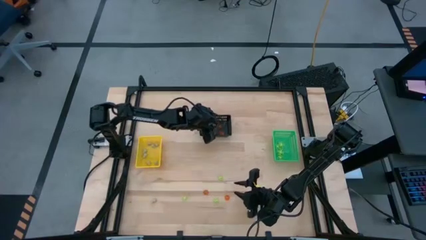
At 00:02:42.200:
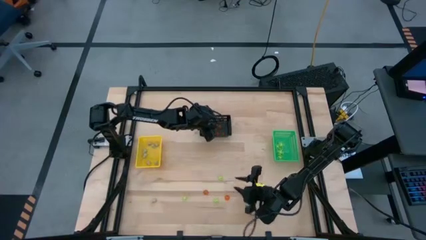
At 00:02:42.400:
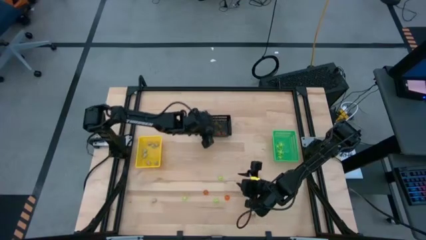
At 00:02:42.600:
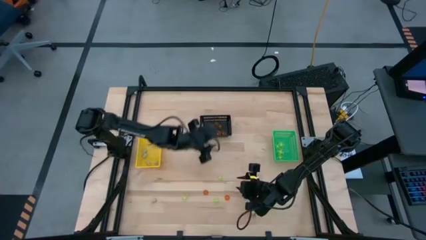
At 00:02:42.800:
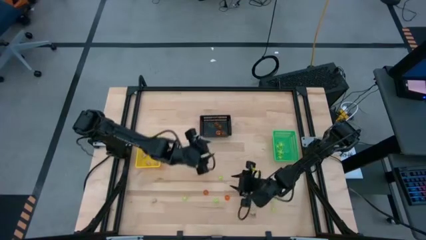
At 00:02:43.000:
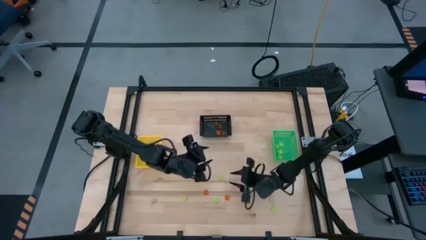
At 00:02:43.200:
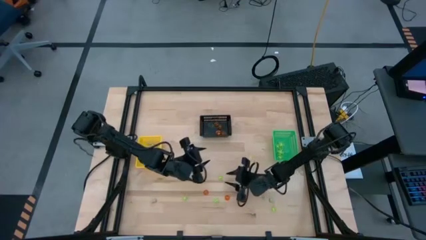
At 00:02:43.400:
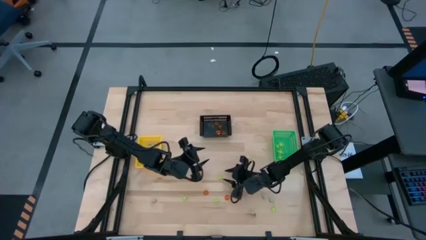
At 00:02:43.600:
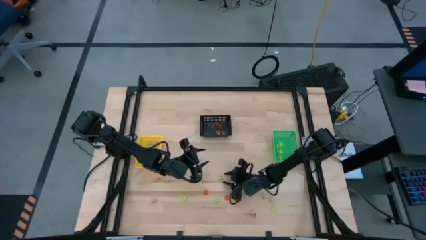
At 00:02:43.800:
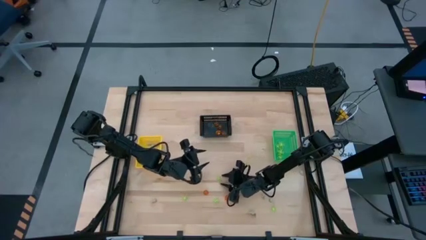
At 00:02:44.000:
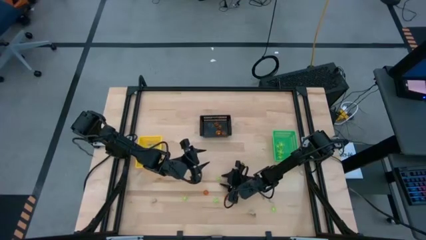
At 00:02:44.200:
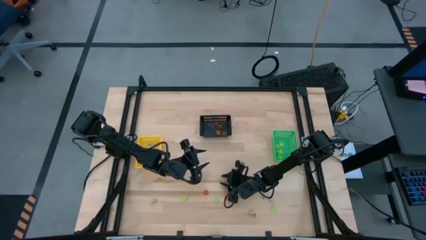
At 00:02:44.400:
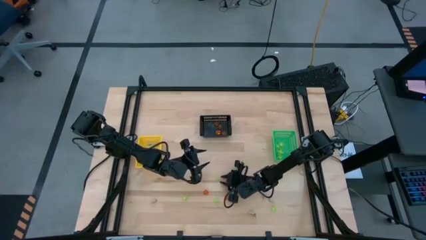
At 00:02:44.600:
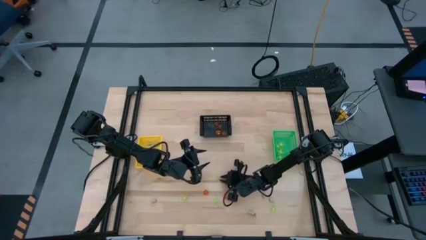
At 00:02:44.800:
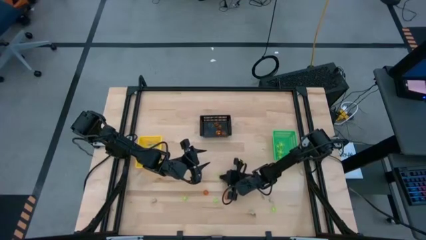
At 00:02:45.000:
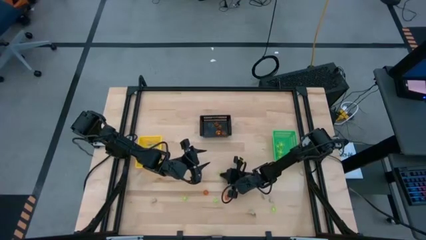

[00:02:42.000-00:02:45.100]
Task: Sort Halloween decoration
Put the green spider toy into the green bin

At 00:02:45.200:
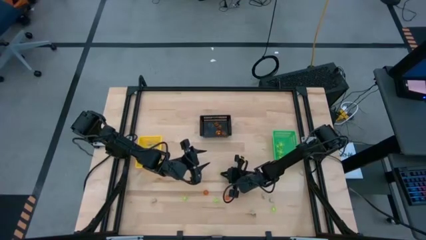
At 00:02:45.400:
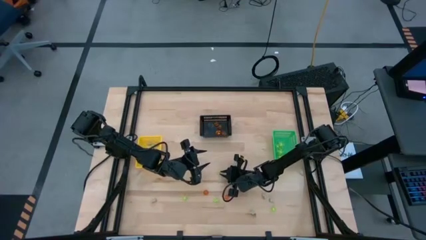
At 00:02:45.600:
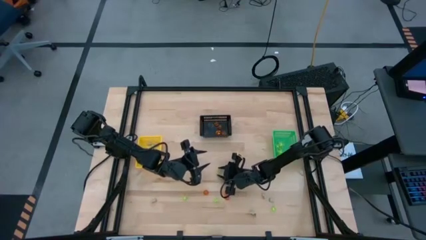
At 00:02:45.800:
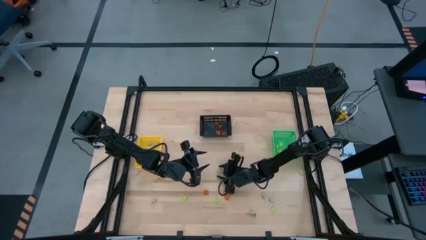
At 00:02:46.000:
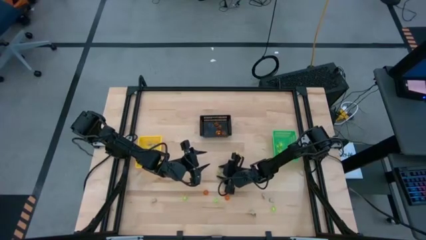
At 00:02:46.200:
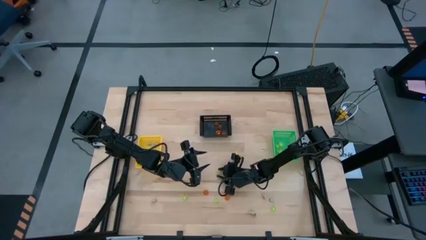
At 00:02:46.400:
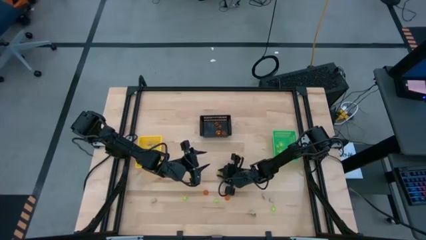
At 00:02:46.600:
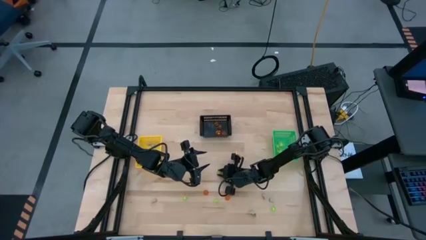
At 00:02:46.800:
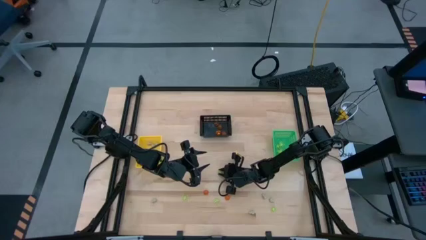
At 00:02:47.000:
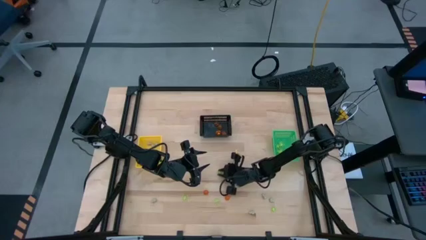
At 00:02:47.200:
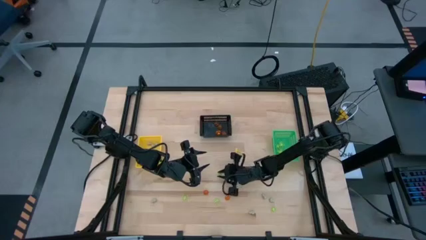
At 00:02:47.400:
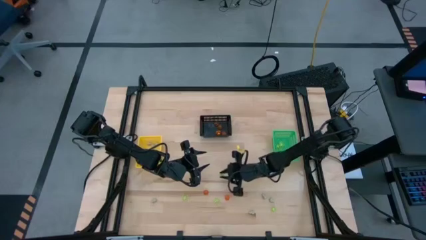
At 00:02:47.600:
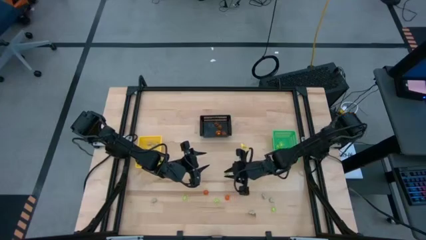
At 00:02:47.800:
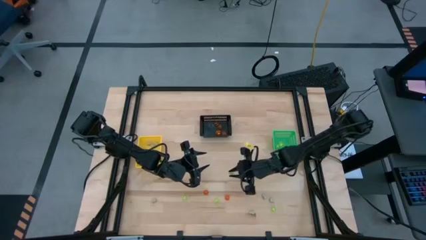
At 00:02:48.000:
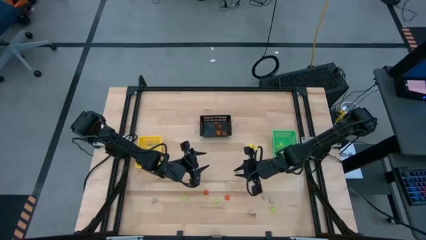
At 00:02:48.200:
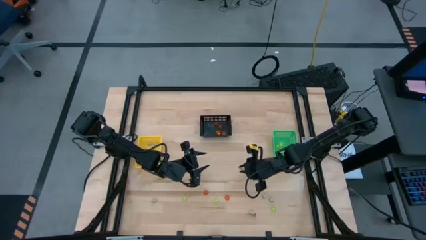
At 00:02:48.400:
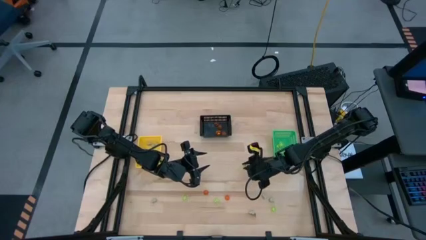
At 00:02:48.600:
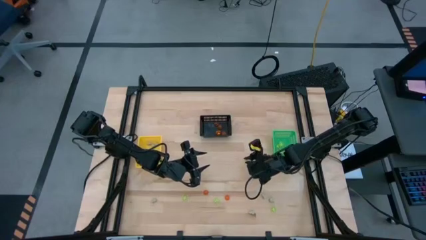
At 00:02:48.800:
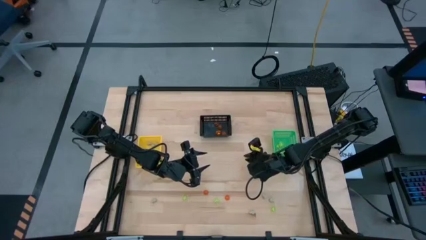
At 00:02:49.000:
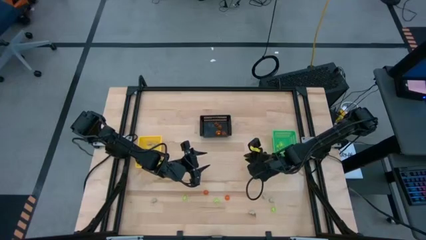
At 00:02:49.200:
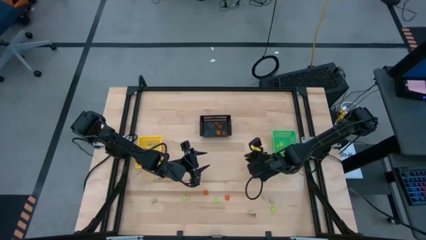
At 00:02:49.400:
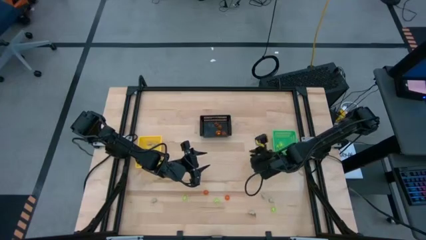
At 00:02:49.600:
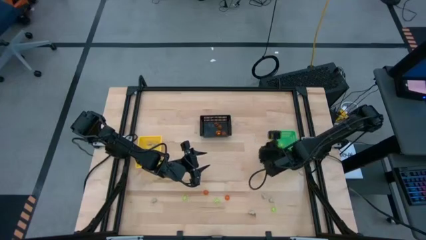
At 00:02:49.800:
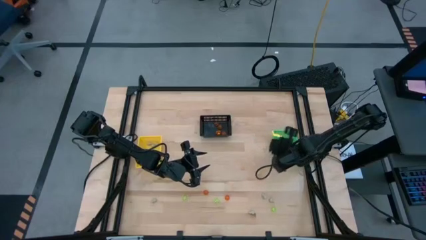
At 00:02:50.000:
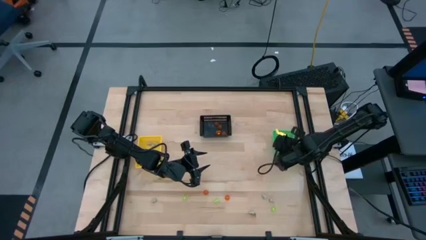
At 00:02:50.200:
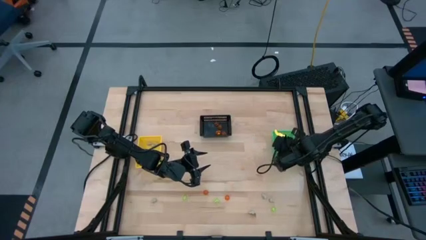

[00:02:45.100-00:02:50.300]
Put the green spider toy into the green bin

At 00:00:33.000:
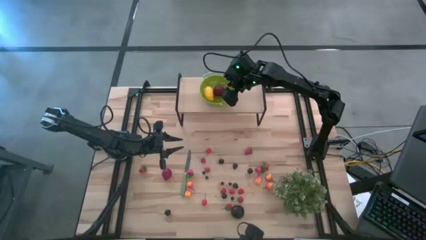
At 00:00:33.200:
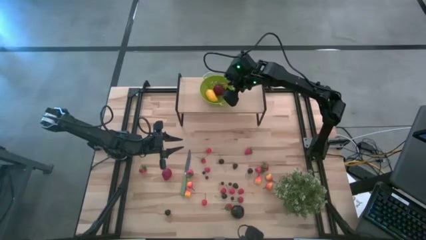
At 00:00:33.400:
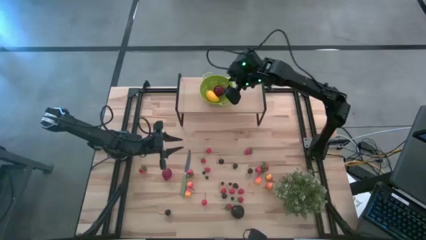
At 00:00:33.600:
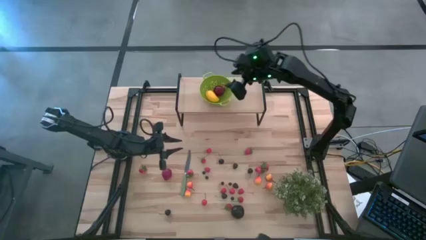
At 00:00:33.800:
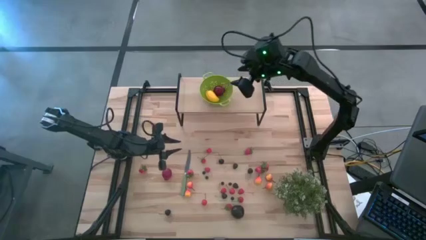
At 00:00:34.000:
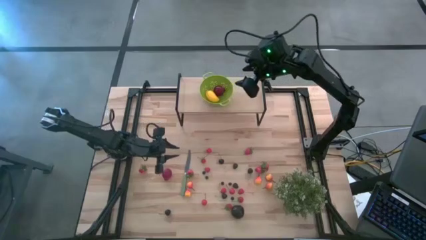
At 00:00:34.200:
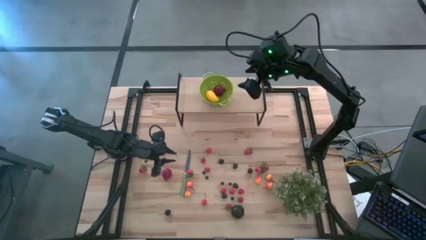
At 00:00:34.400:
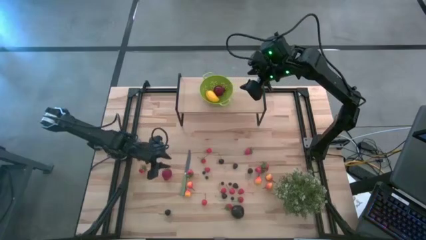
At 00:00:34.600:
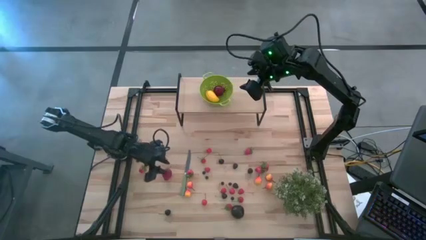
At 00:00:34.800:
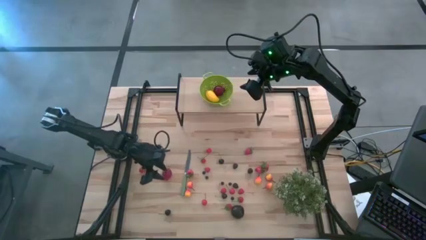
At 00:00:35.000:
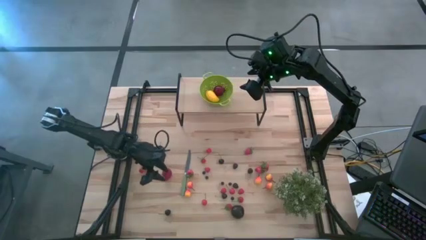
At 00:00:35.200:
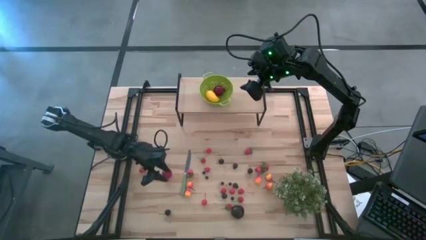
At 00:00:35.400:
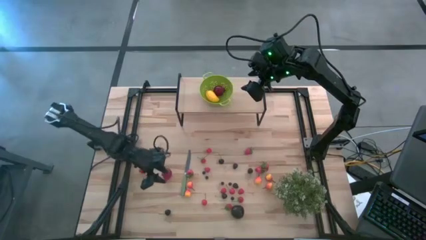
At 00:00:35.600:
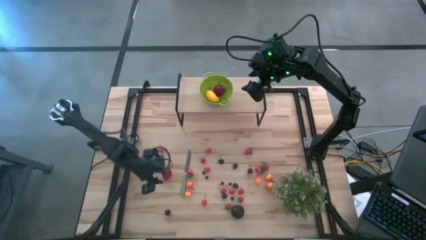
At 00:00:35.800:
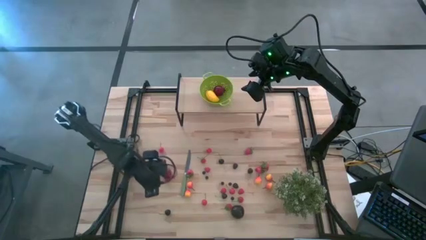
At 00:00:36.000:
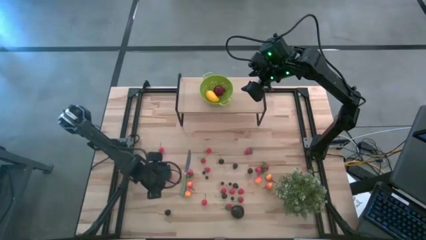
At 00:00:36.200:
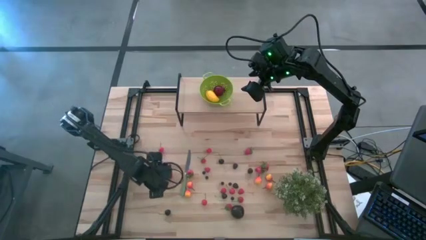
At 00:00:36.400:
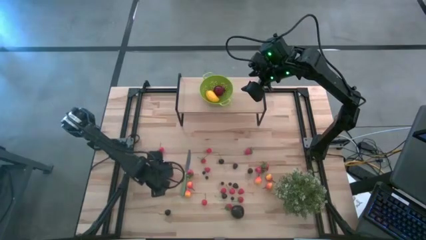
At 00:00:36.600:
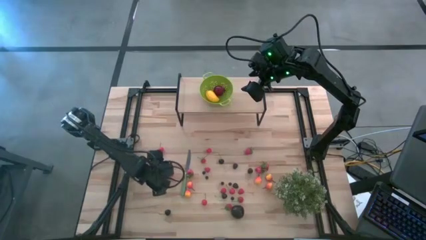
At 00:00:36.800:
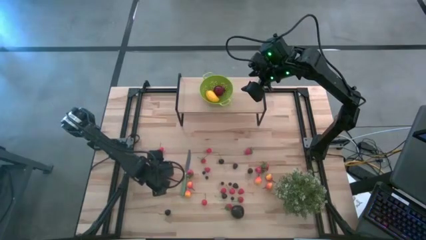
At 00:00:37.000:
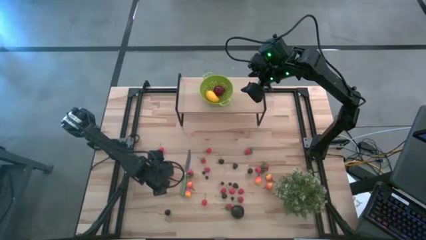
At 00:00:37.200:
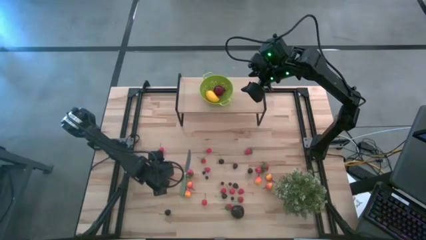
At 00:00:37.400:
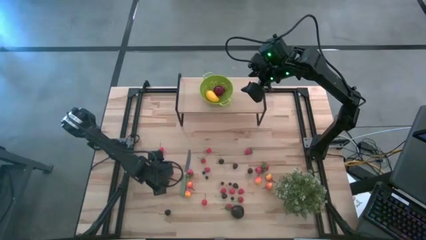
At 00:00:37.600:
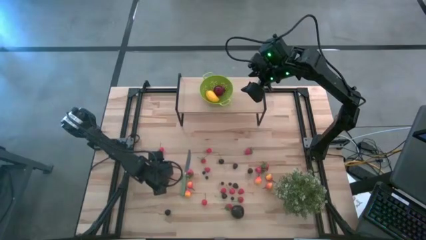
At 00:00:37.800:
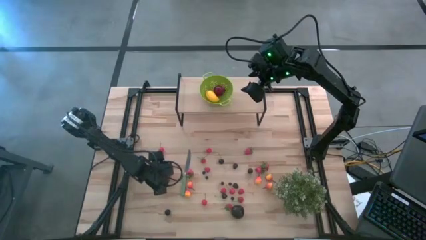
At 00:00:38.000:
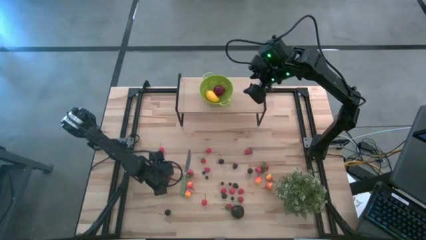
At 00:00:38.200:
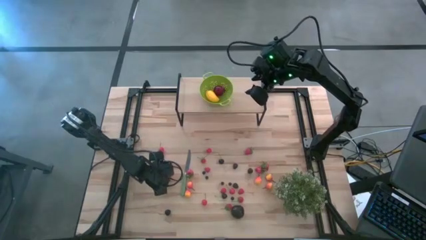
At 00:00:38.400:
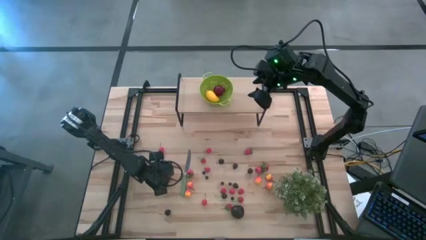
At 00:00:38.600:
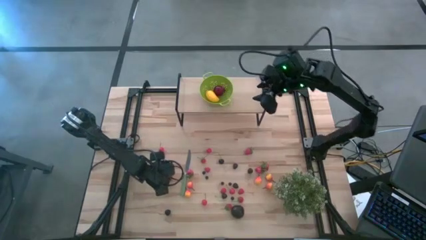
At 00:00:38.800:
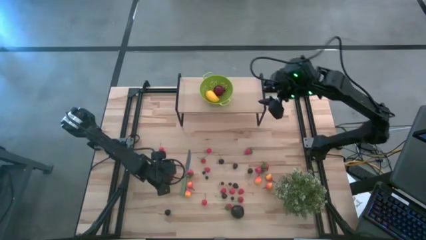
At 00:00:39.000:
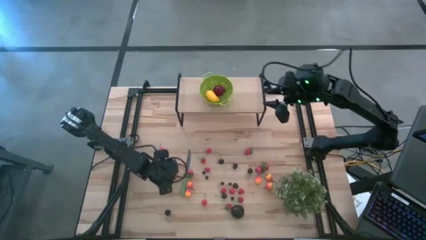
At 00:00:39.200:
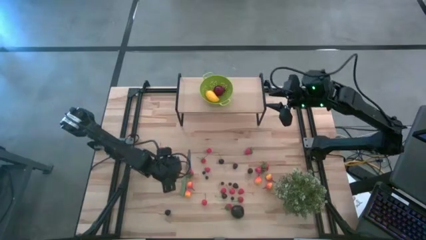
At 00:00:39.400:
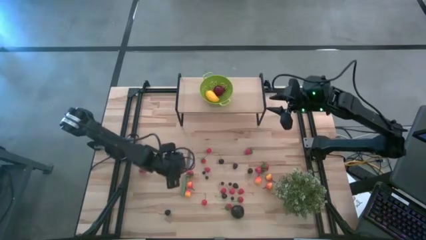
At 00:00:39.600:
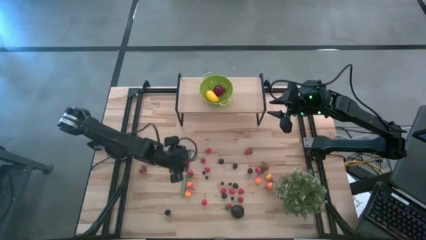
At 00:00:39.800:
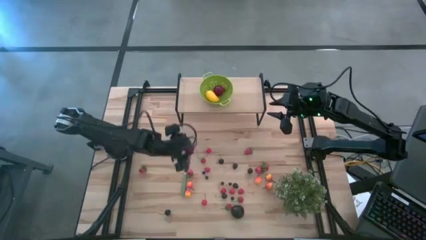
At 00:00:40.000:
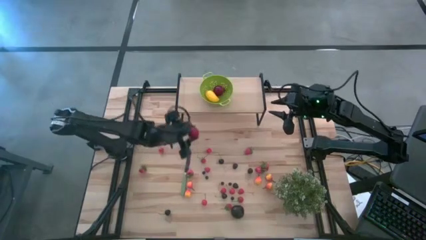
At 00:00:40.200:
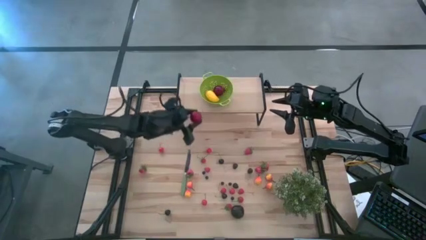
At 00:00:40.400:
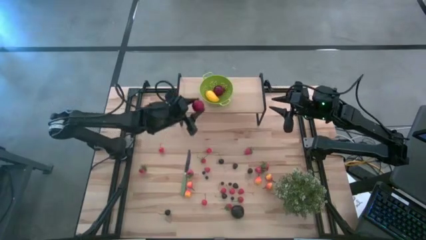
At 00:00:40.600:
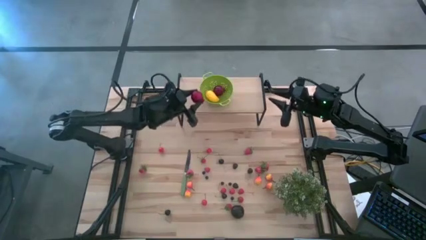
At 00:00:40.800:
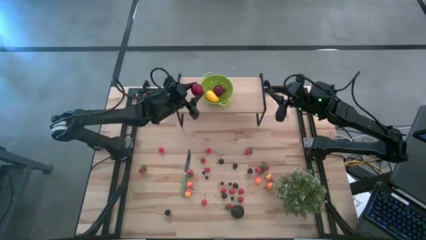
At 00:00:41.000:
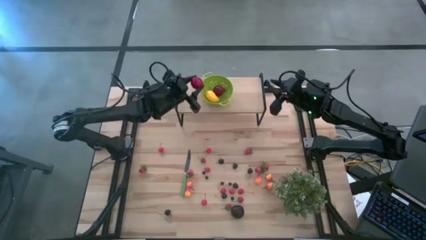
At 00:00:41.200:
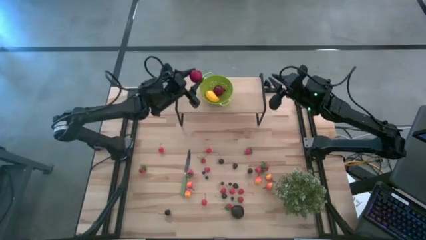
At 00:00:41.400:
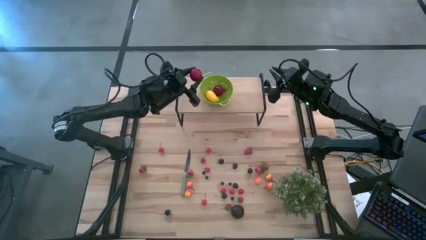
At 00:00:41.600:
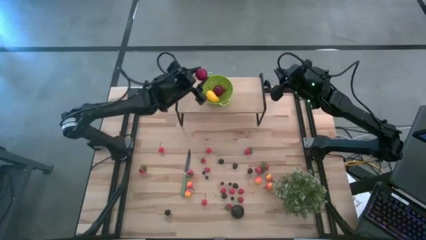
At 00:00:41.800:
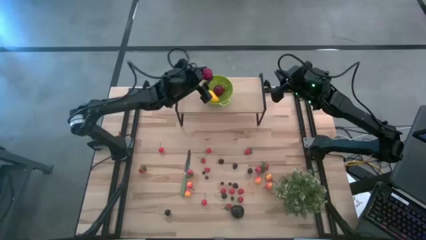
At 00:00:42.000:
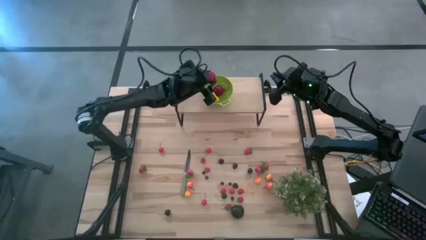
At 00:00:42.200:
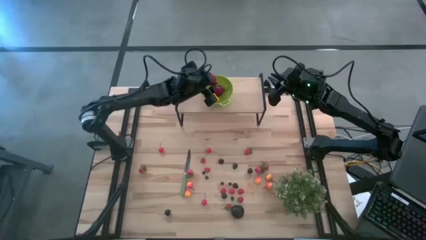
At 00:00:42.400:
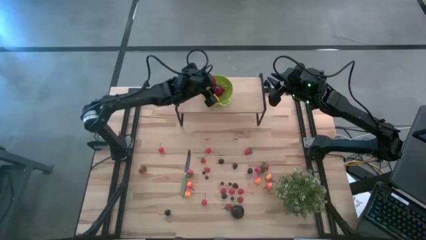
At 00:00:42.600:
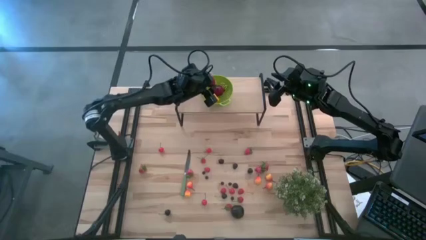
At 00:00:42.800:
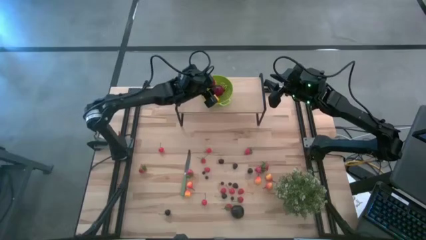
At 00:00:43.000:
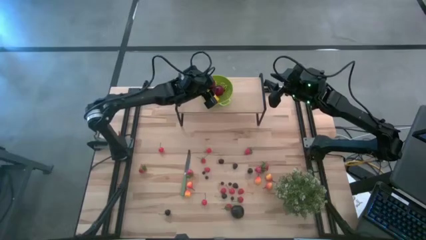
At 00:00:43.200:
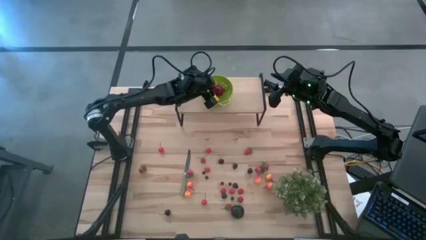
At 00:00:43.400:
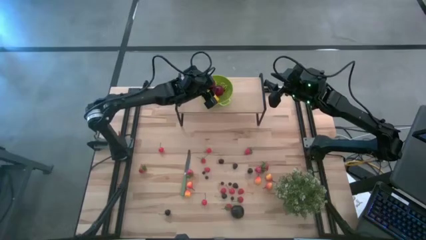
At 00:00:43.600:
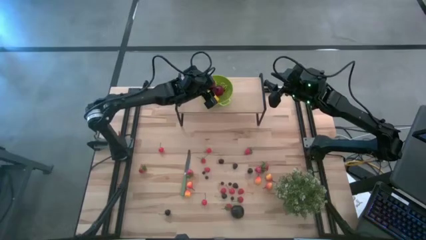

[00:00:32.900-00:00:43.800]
Task: Pick & Place Fruit
Put the pomegranate into the green colander on the shelf
